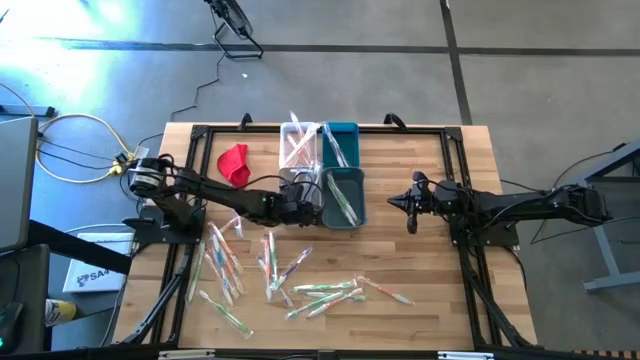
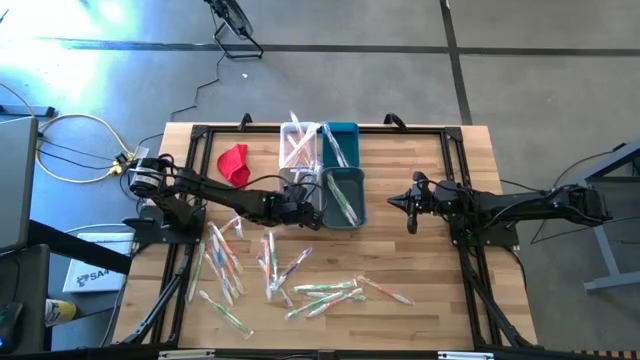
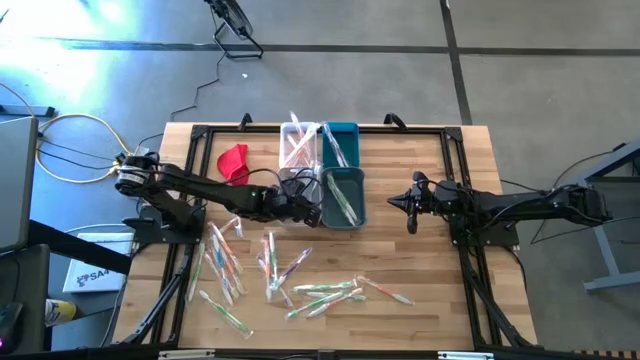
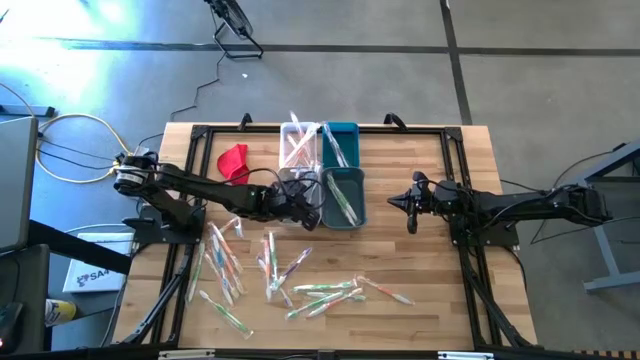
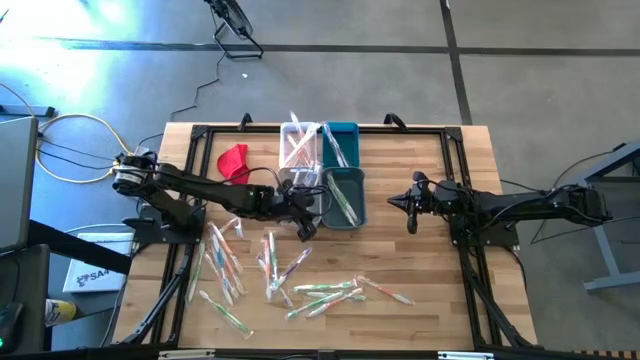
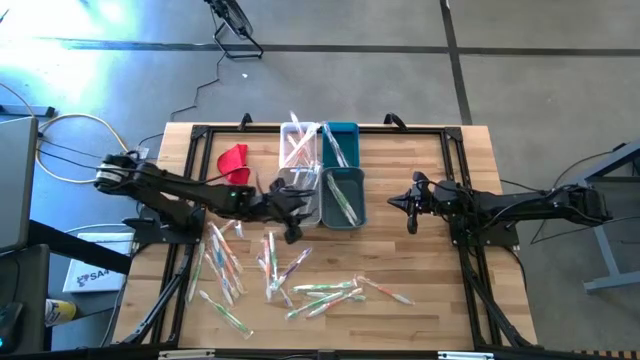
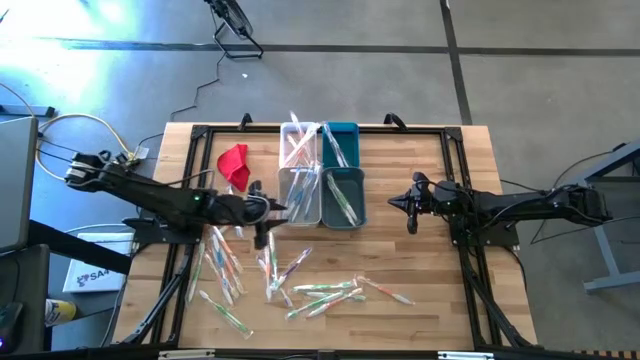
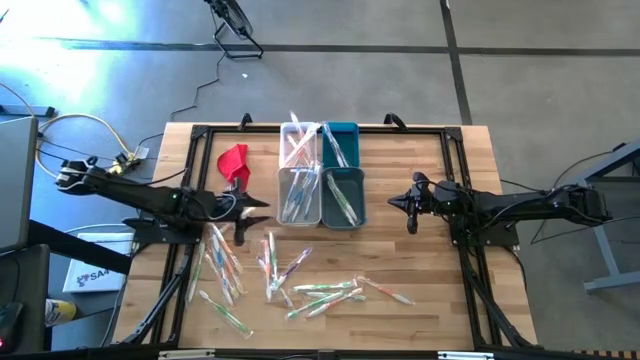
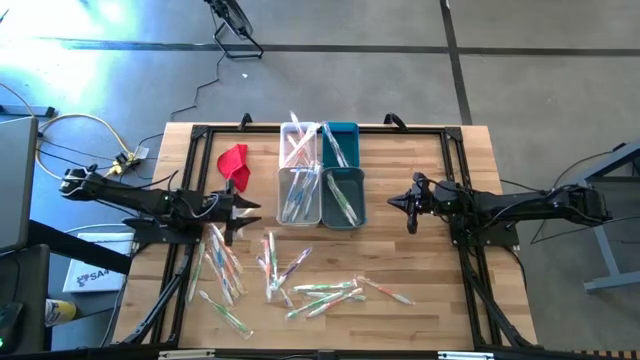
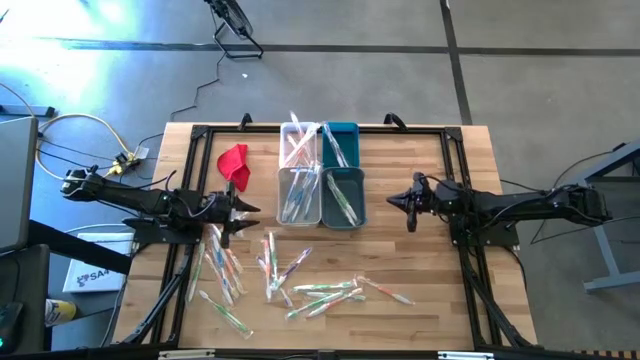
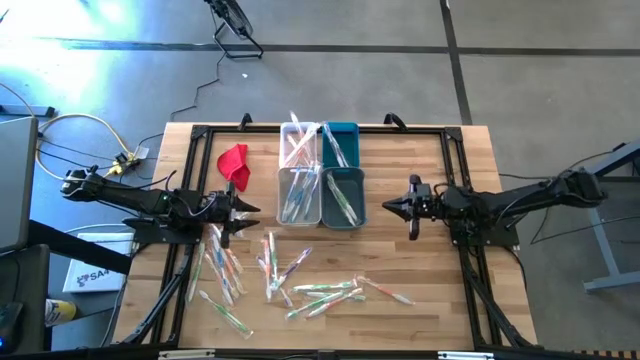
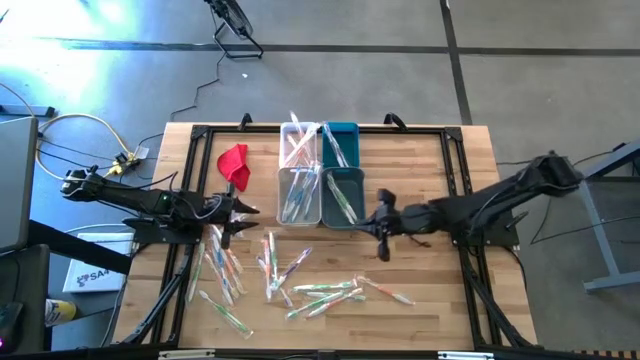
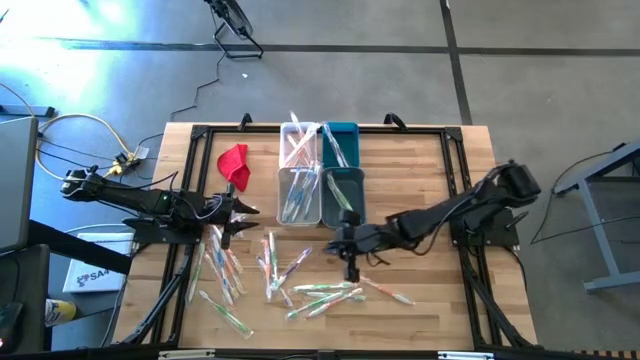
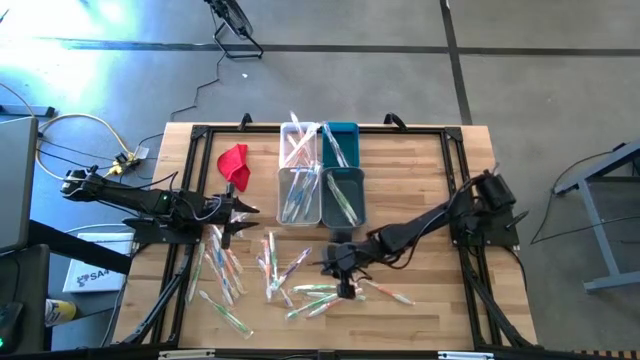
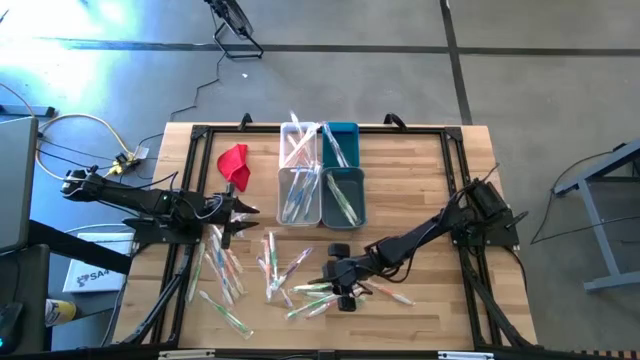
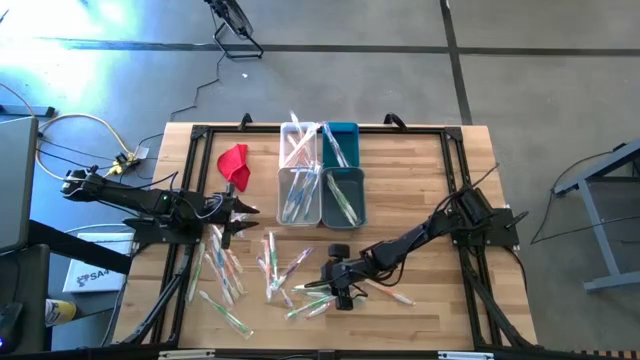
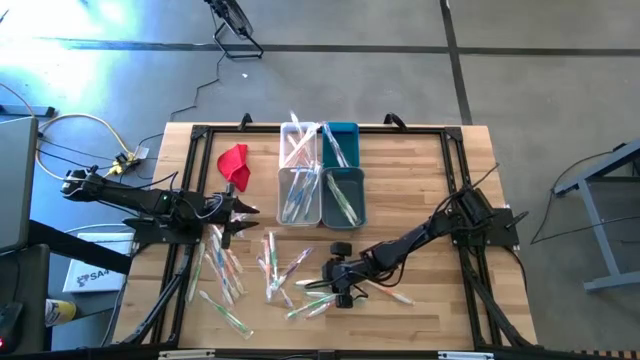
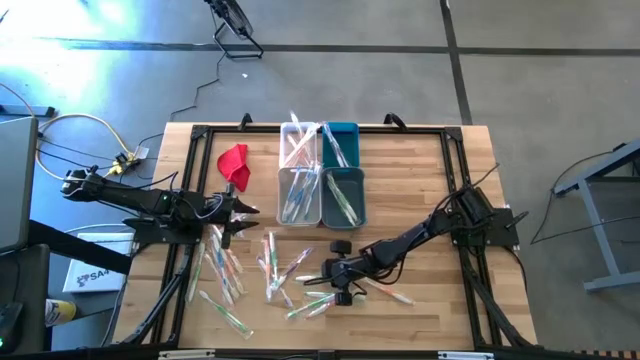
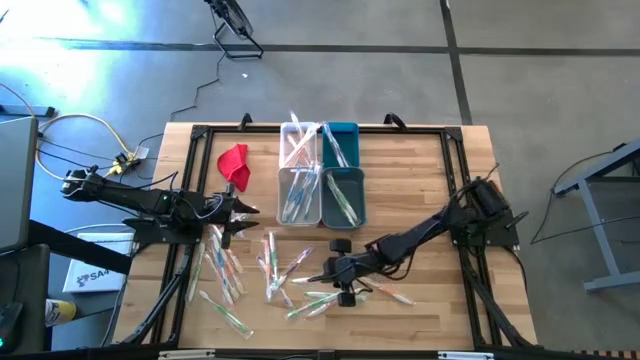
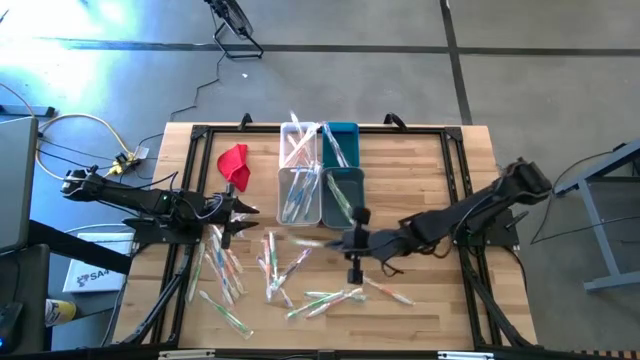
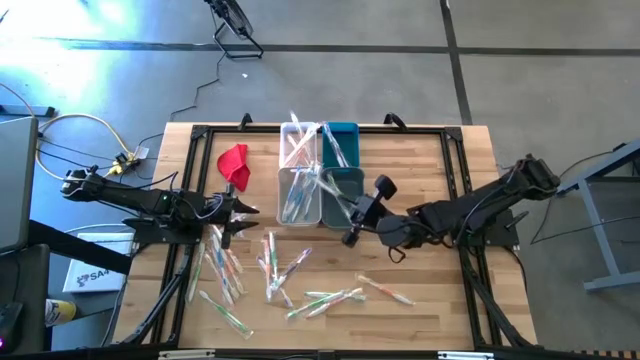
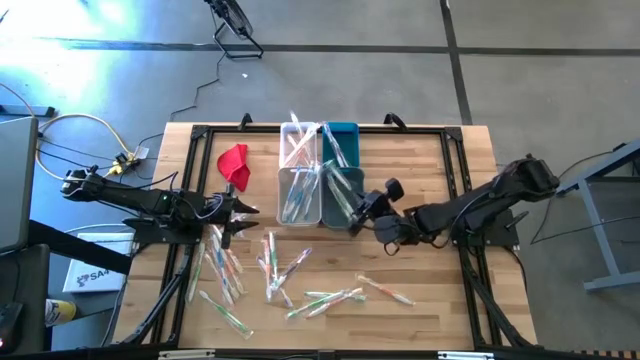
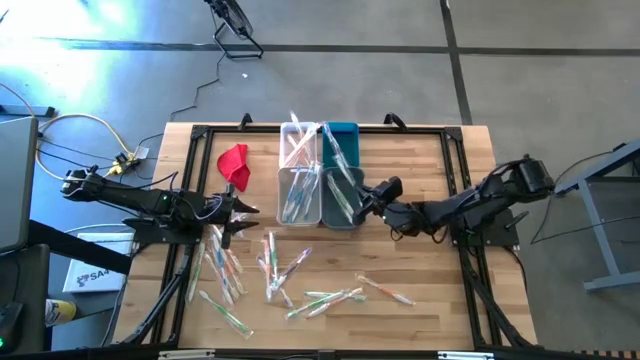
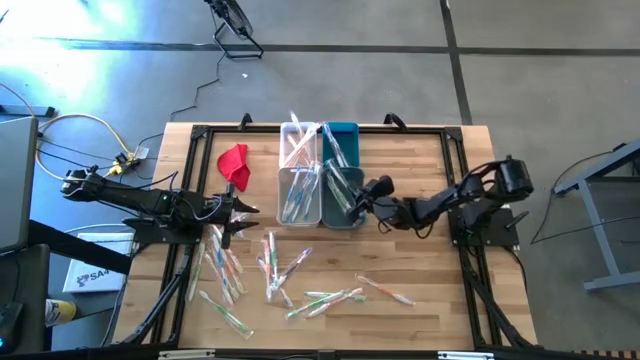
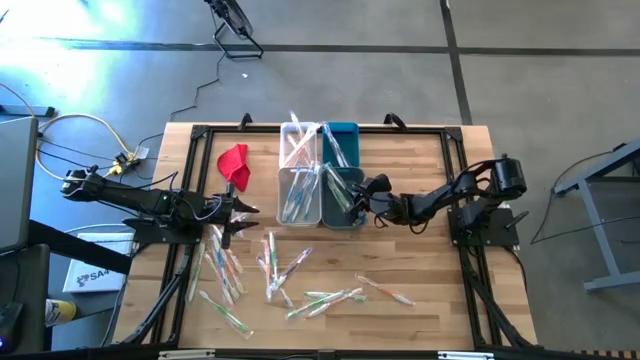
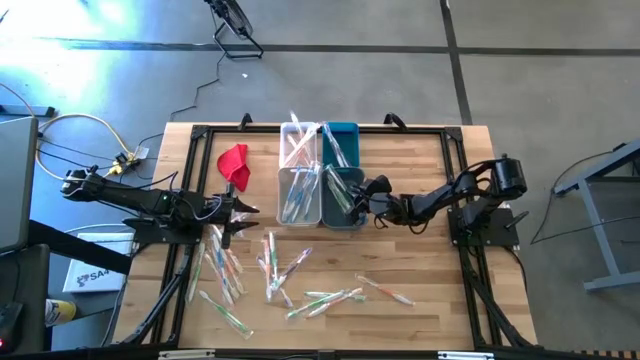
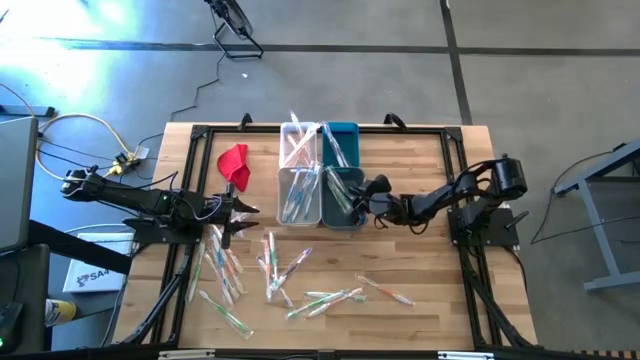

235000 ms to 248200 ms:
Task: Pick & Place Toothbrushes
Put the green toothbrush into the blue bin
